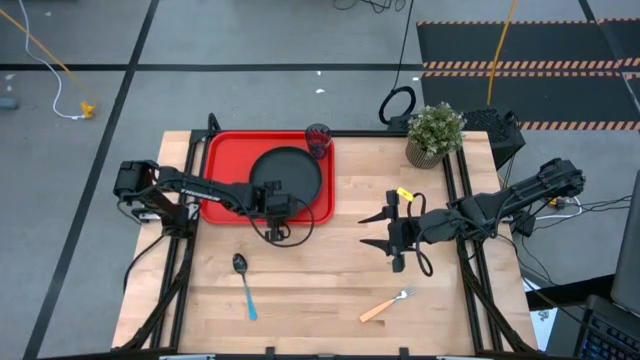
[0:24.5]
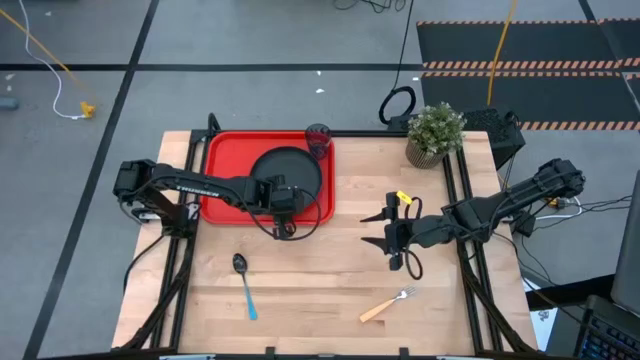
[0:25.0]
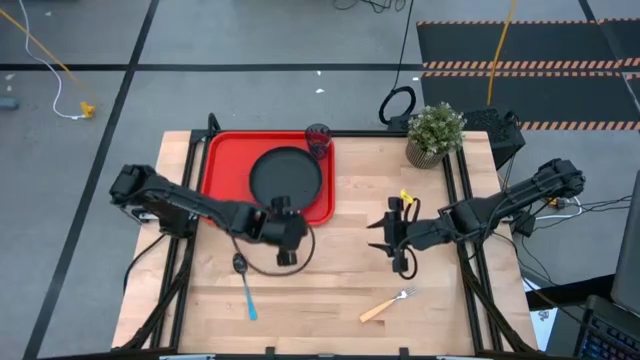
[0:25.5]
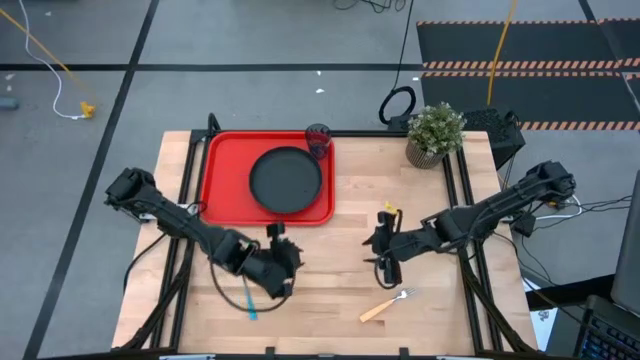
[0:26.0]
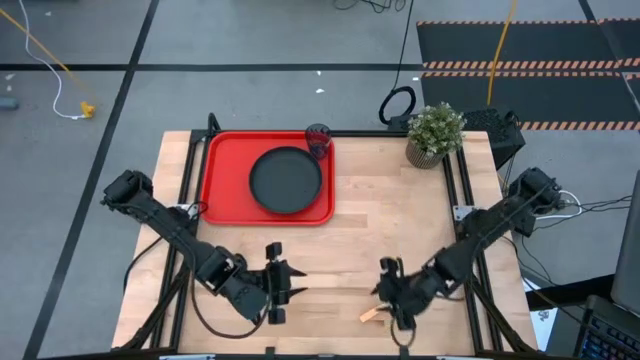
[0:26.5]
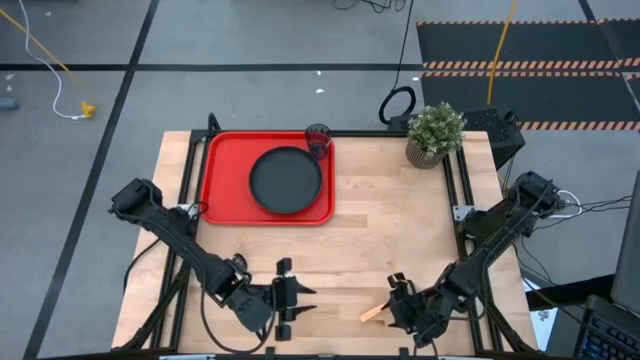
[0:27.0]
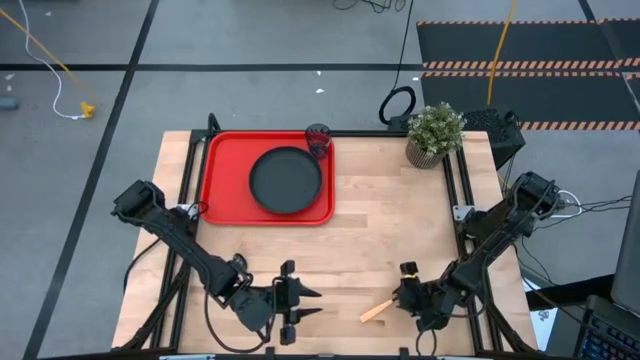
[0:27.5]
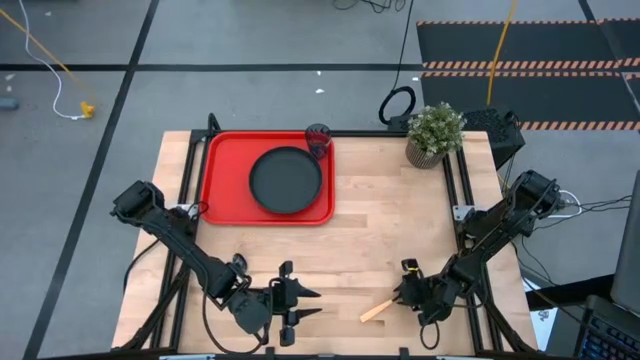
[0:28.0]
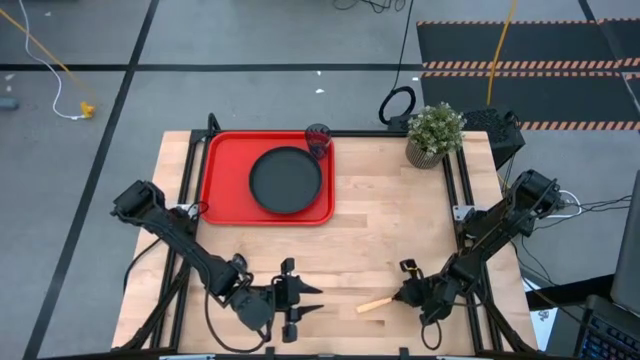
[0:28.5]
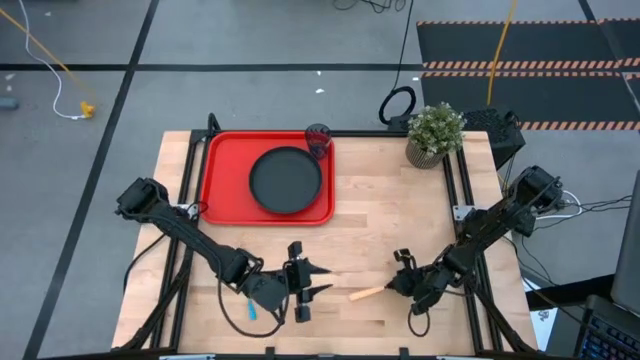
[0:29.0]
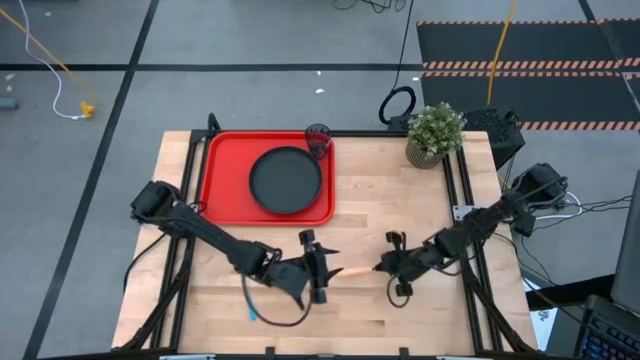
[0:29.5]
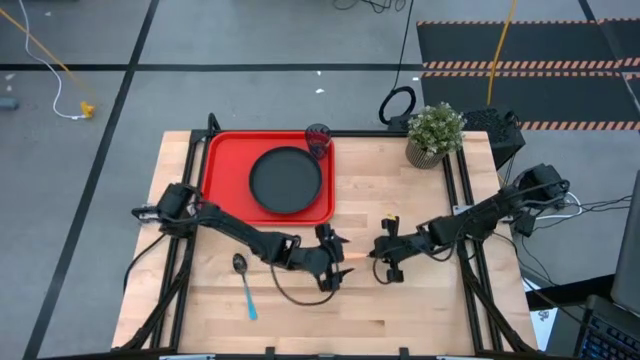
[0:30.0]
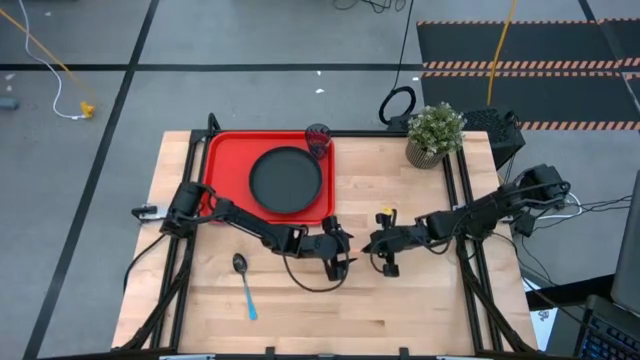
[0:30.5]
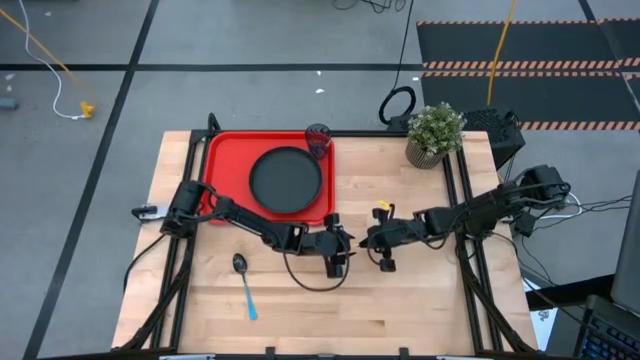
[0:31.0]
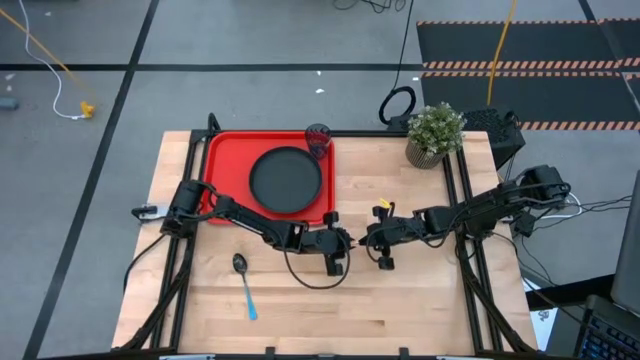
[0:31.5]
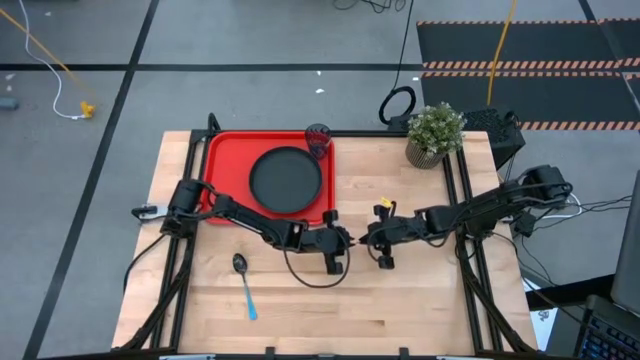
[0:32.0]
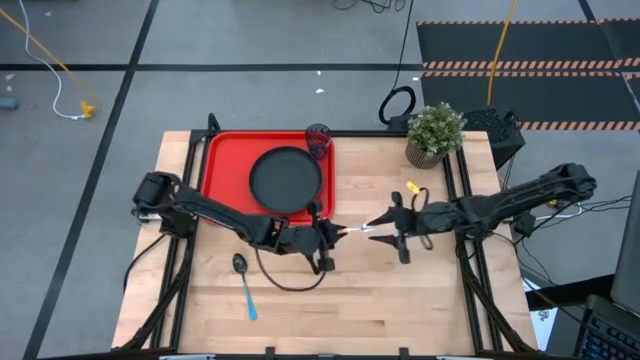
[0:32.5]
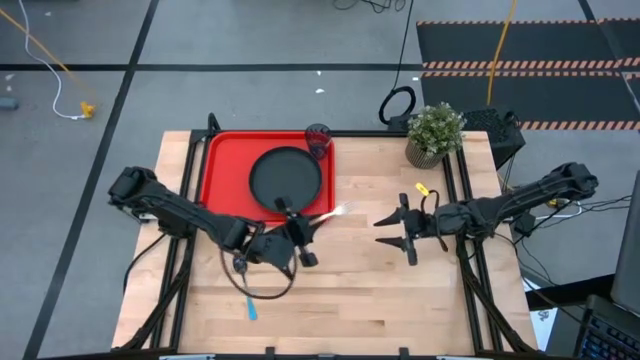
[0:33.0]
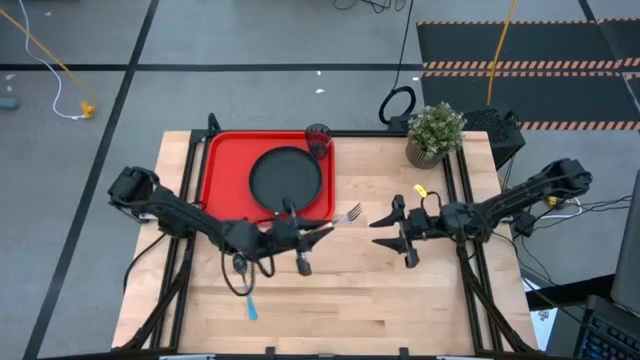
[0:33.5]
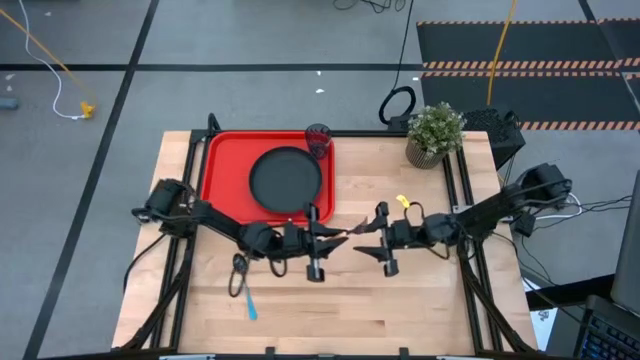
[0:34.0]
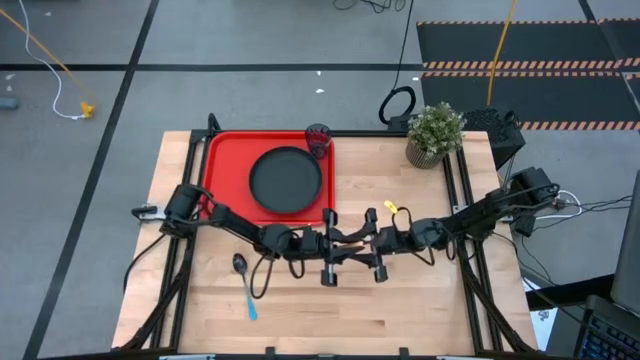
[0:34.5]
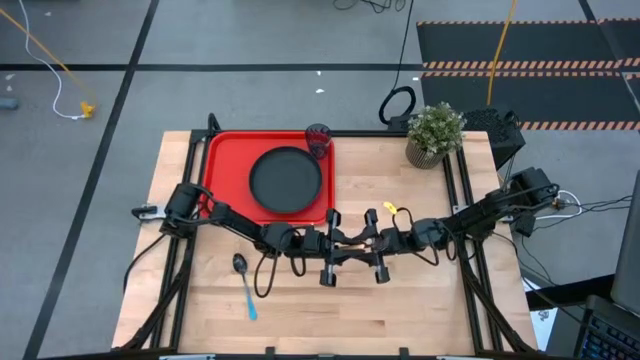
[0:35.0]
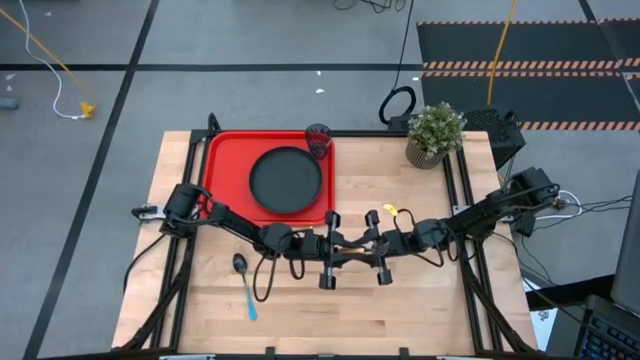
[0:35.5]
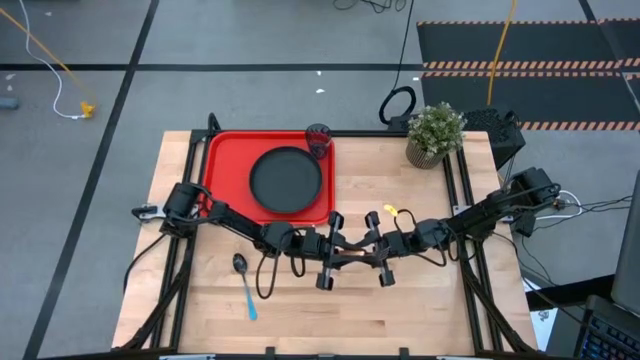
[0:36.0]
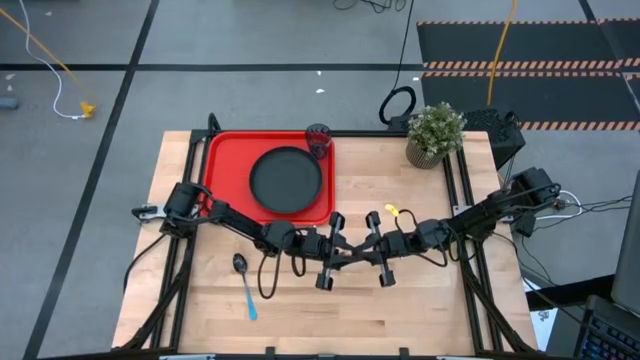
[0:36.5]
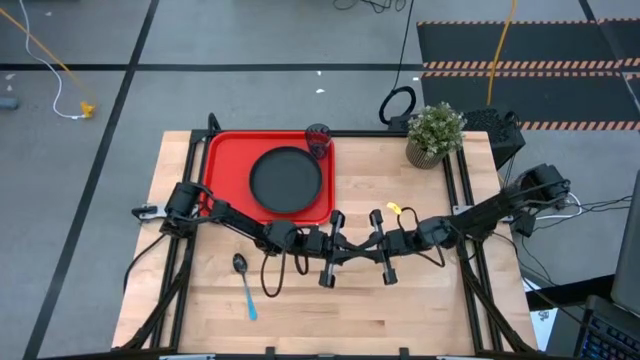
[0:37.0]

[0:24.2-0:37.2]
Task: Pick and place plate/cup/fork/spoon on tray
Put the light orange fork on the red tray to the left of the black plate

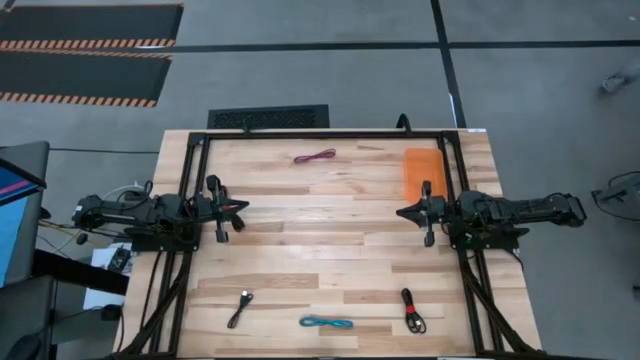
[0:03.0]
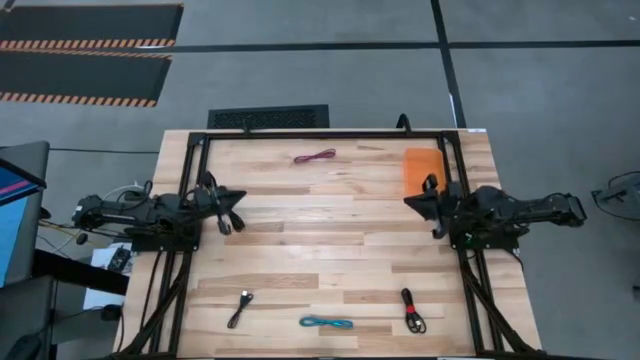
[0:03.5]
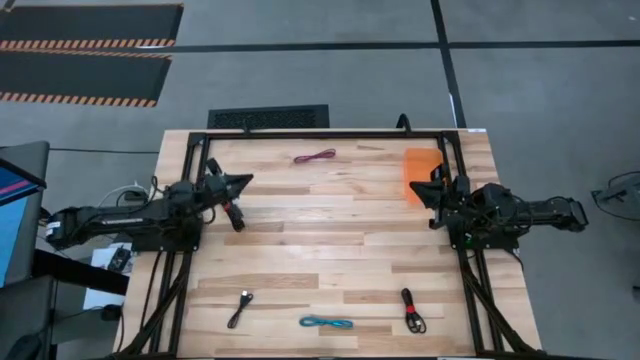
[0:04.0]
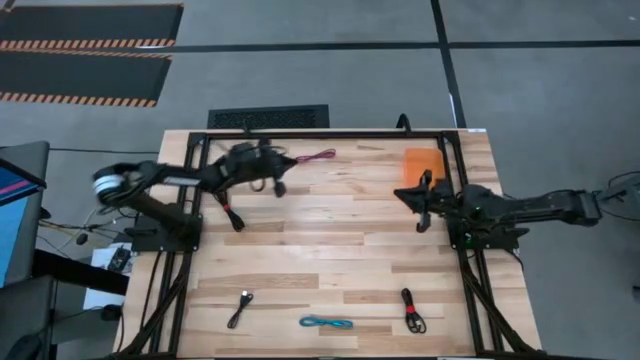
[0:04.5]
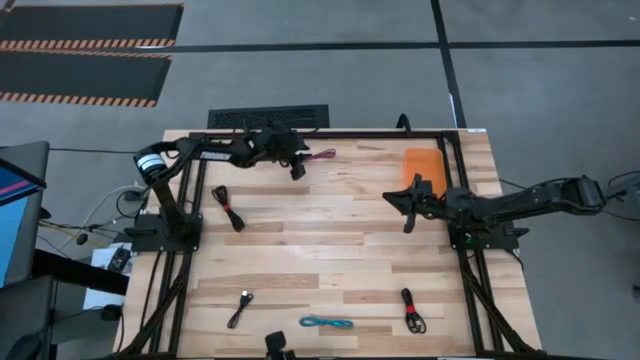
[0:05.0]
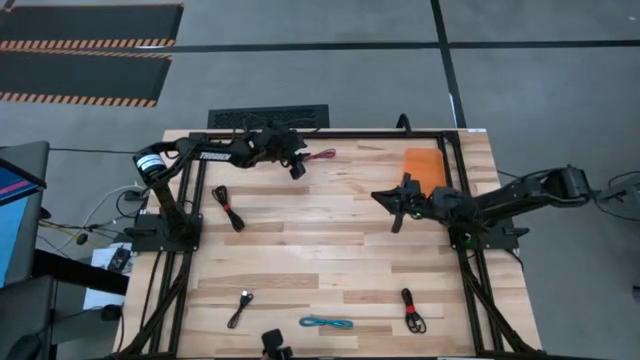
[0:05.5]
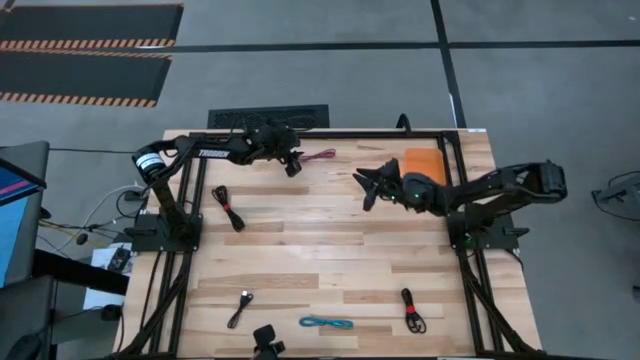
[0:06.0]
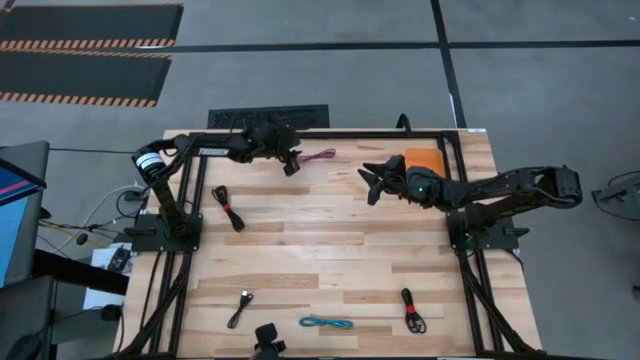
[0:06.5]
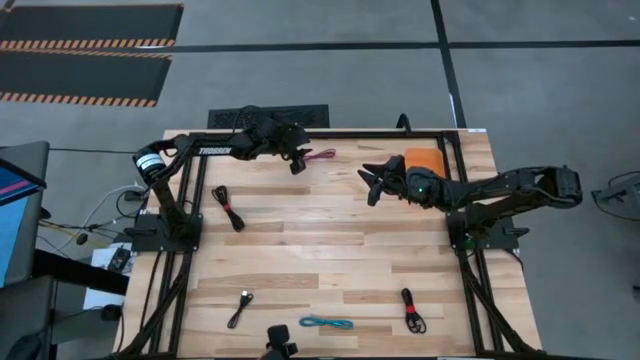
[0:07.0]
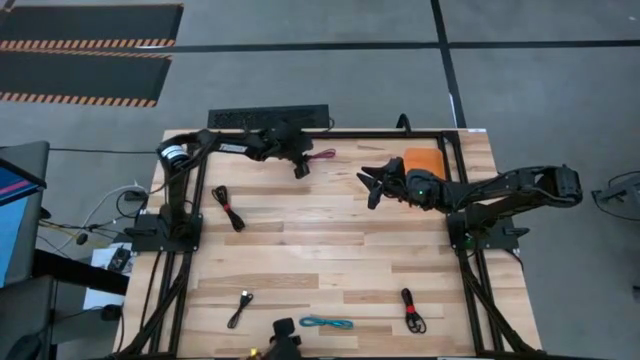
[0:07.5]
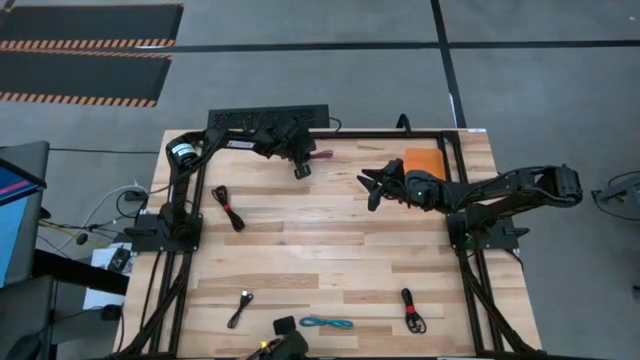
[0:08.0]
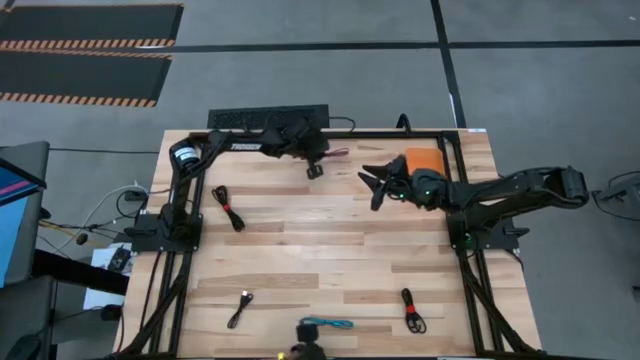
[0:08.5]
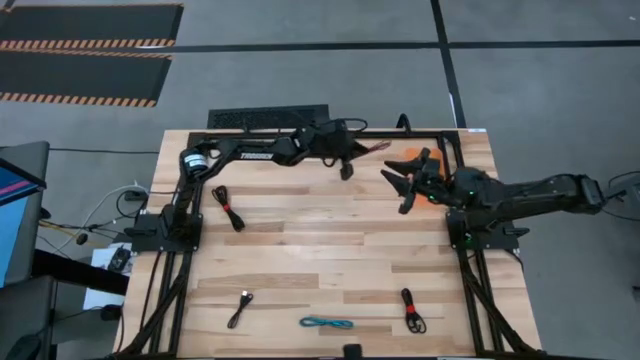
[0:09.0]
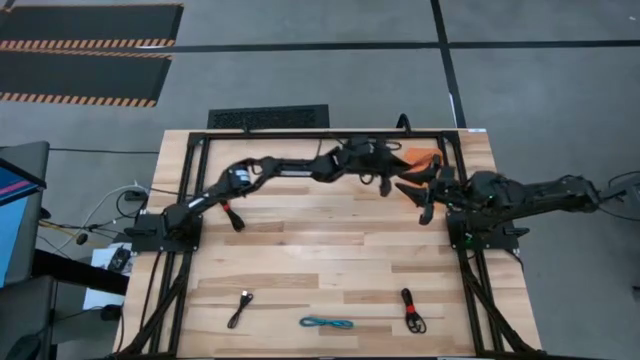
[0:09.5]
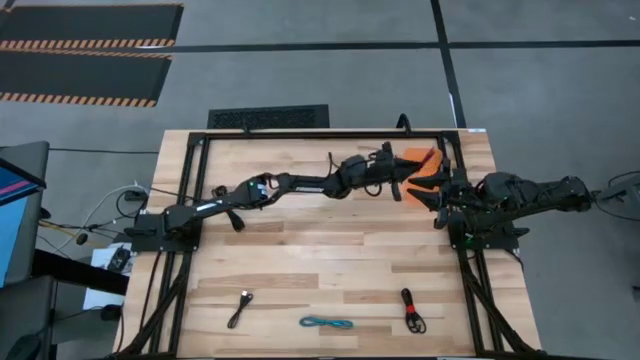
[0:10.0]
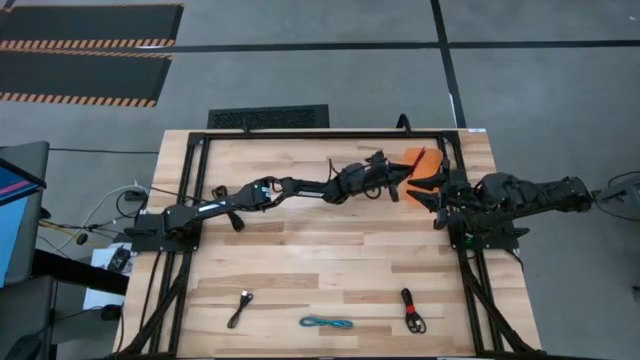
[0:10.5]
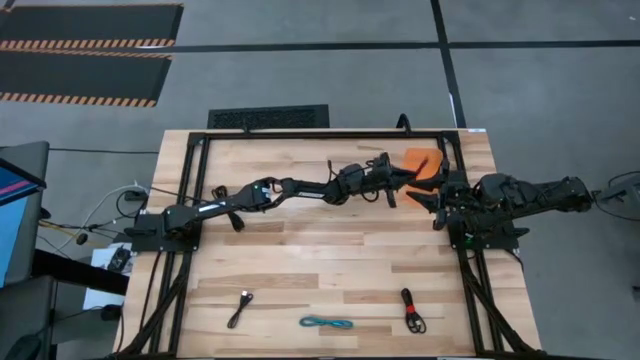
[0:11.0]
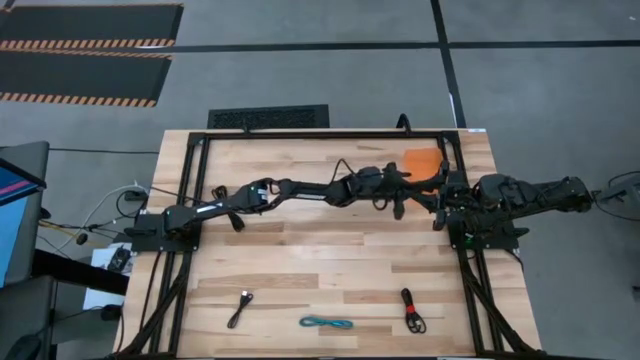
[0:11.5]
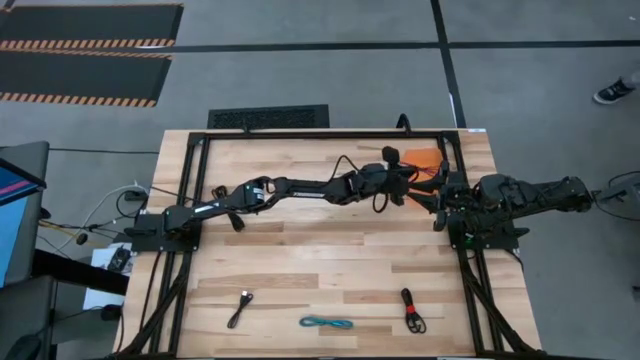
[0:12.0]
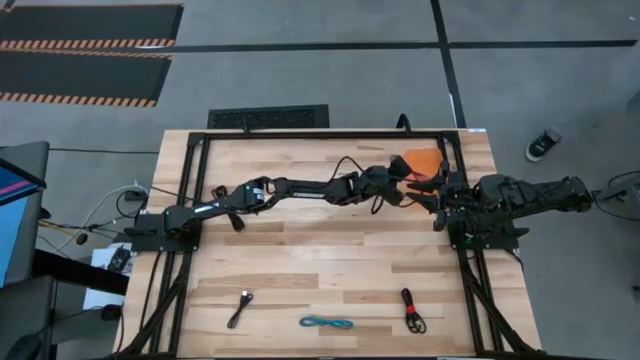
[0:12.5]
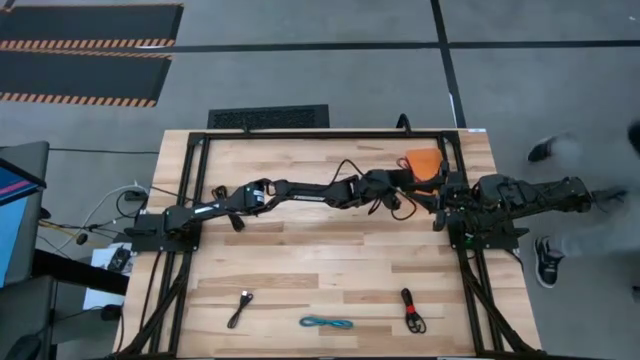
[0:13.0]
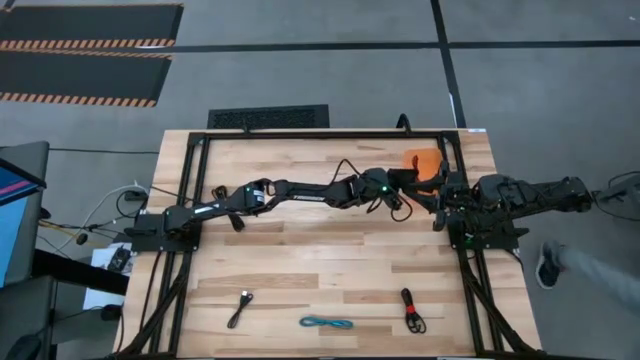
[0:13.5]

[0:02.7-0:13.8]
Task: Pick and place USB-C Cables
Put the black and pink charger cable into the orange bin
